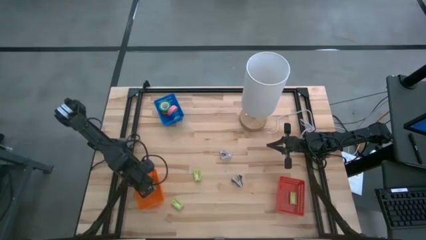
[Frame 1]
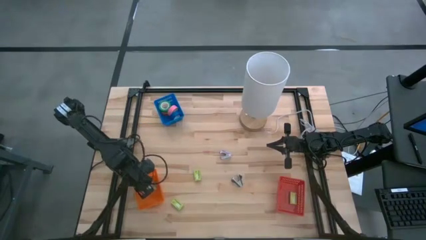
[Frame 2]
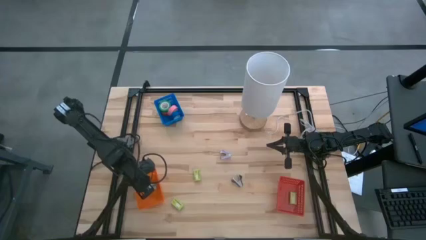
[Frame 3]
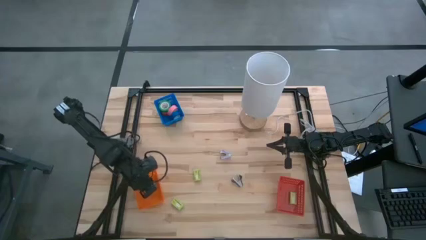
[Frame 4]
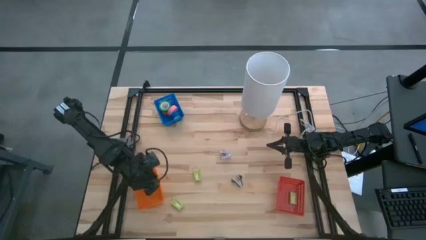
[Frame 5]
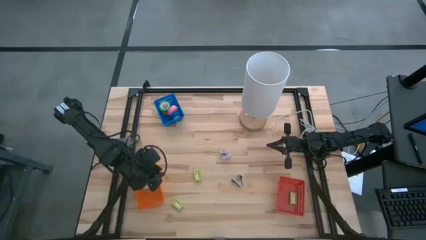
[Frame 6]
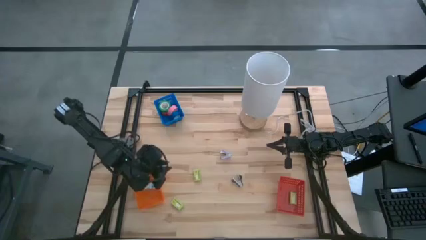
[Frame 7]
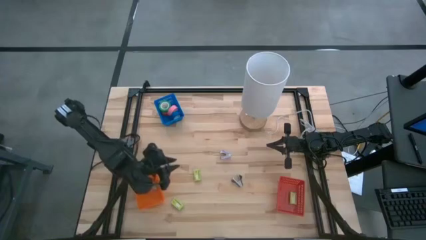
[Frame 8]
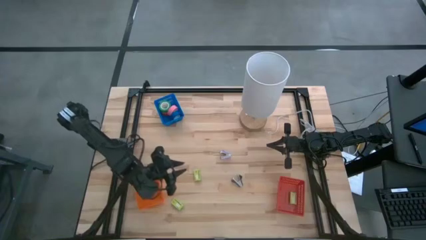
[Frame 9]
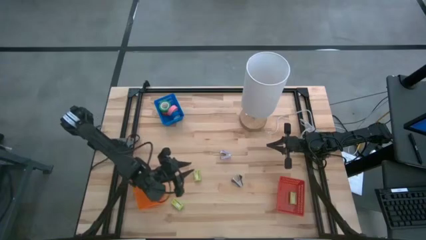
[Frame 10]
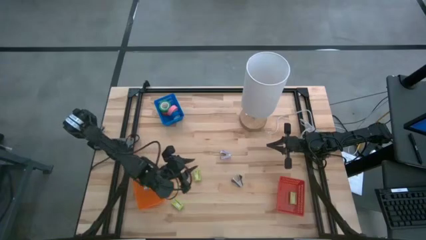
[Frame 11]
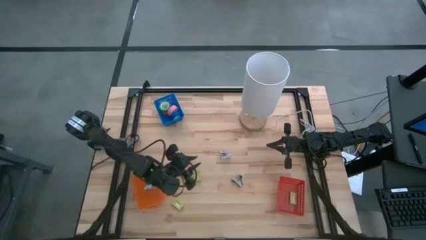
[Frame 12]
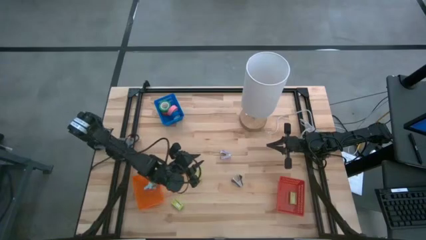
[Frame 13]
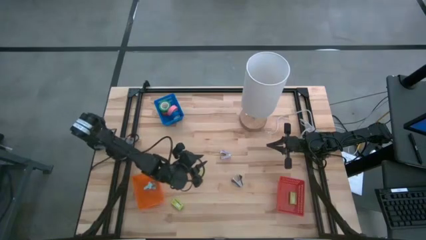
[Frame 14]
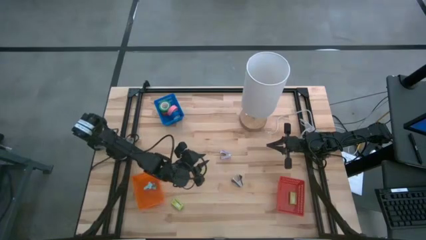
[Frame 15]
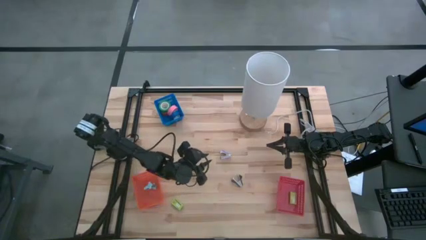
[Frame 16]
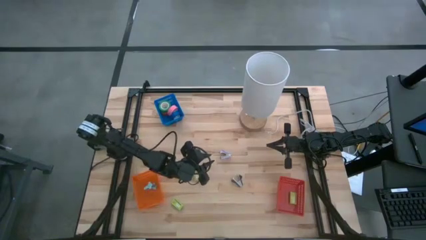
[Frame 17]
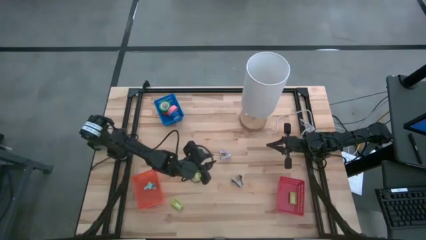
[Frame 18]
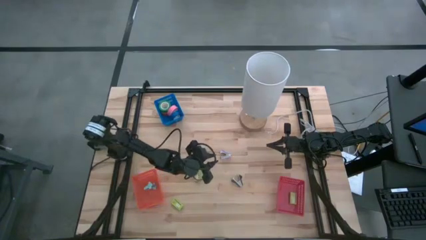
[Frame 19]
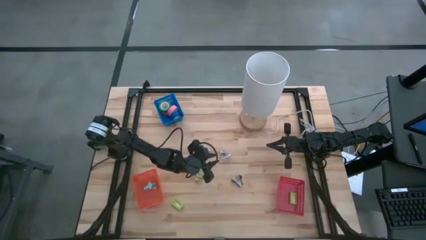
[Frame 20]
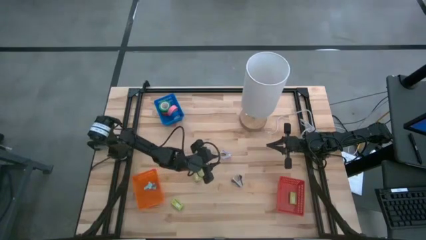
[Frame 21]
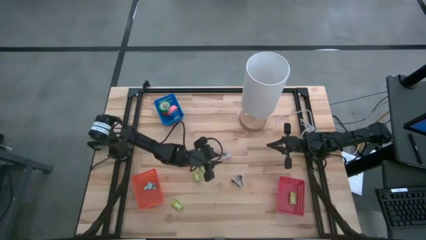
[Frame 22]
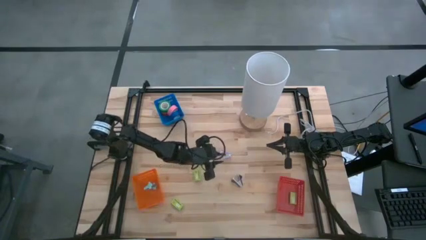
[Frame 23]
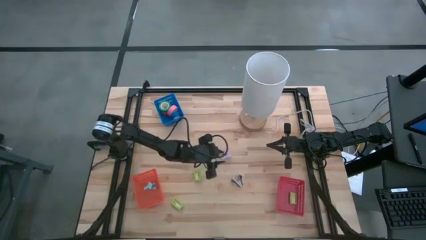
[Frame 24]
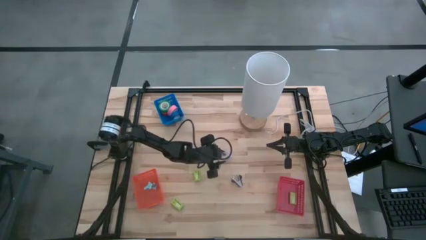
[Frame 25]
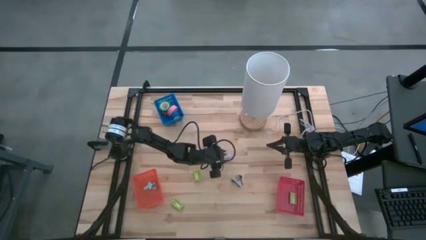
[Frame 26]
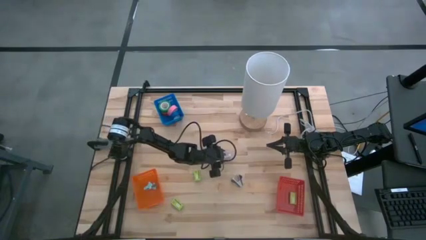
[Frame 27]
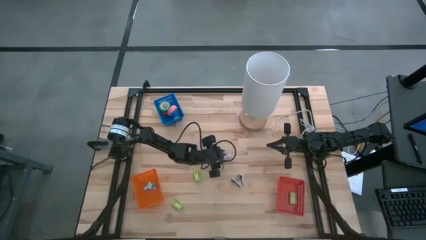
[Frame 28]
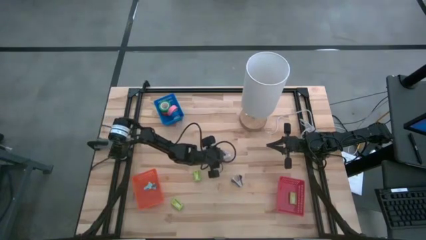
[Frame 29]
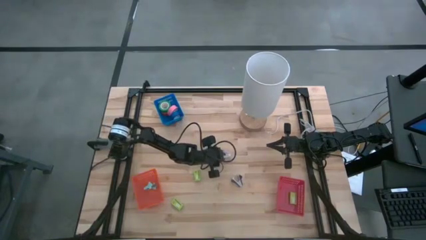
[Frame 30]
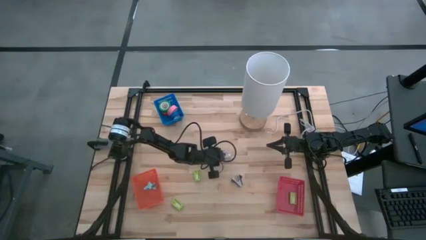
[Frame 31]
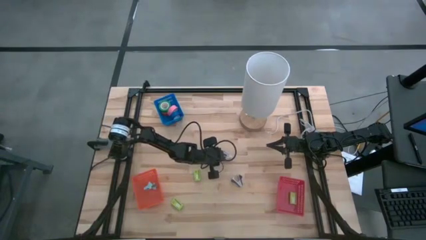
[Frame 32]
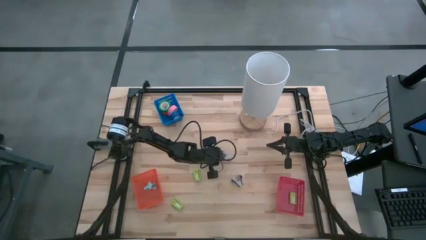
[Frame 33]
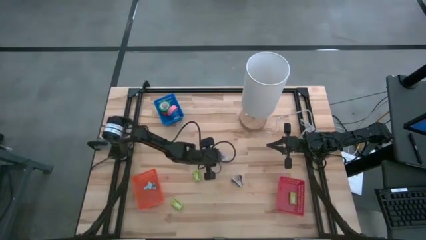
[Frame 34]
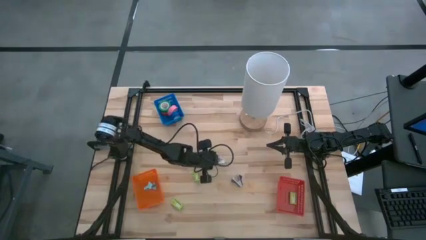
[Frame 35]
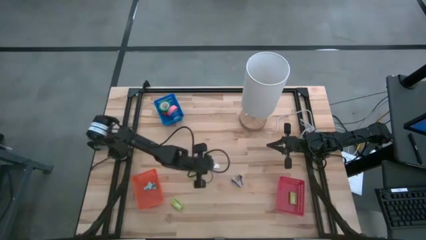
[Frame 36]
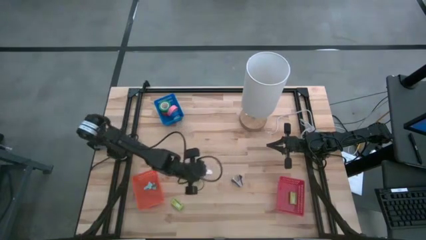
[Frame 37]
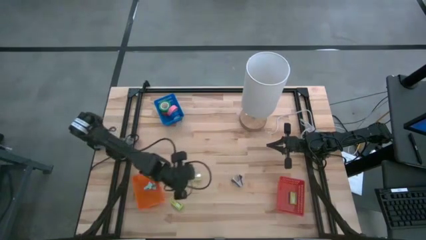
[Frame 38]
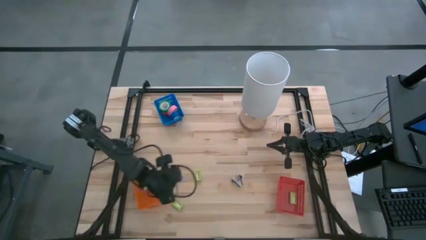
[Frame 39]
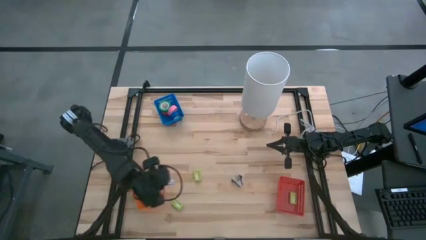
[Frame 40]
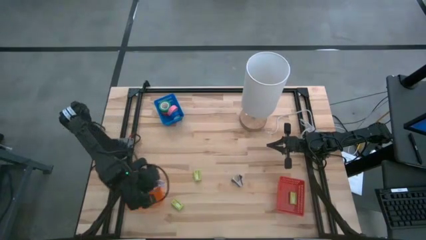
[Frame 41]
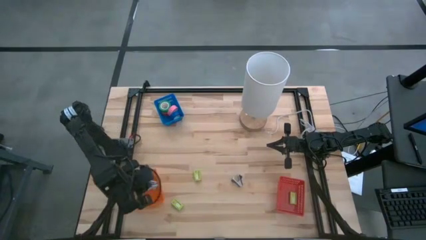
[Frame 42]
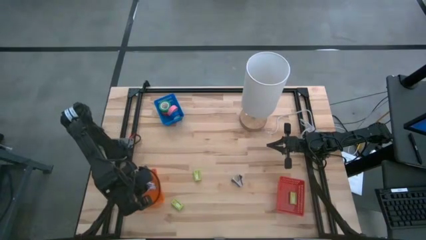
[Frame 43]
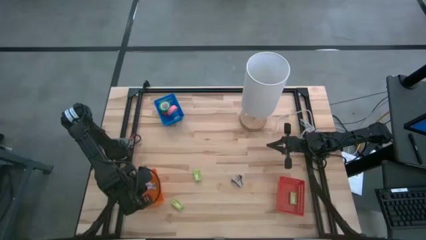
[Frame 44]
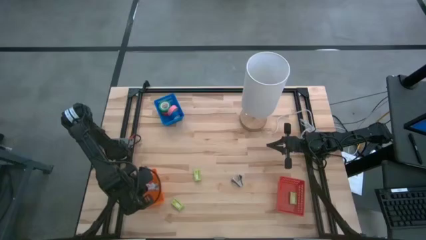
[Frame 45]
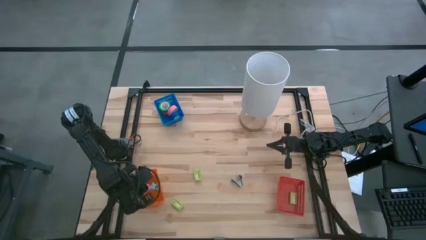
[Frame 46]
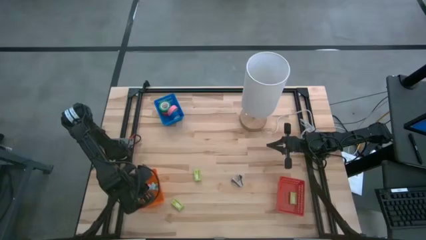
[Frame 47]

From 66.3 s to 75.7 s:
Task: Pick and place Stapler, Stapler remover, tape
Put the purple staple remover into the orange basket

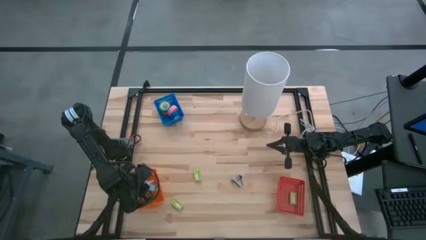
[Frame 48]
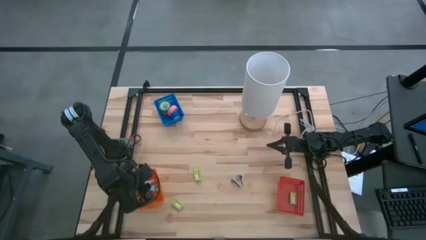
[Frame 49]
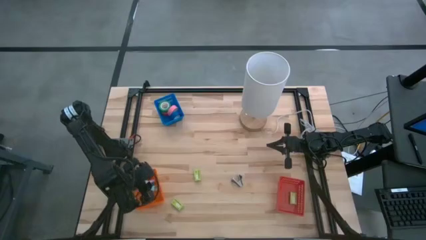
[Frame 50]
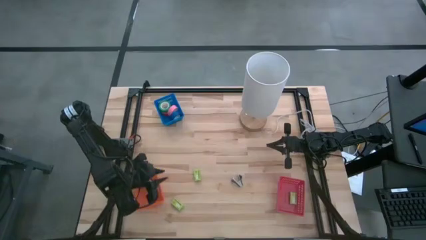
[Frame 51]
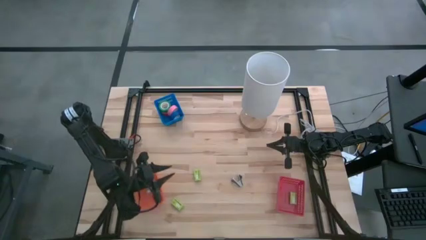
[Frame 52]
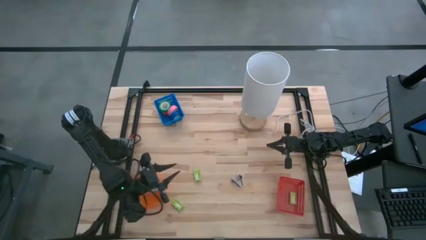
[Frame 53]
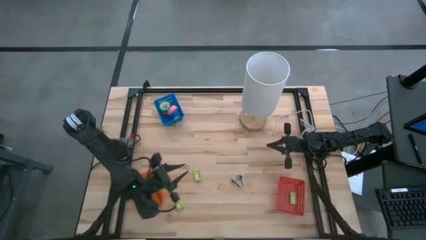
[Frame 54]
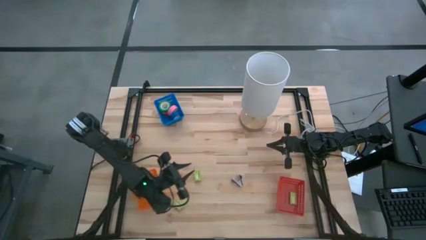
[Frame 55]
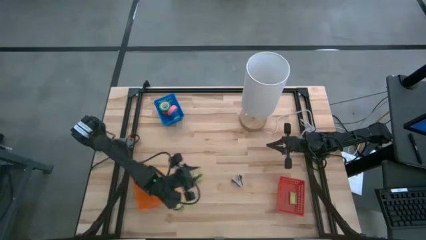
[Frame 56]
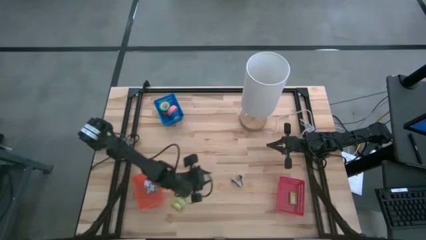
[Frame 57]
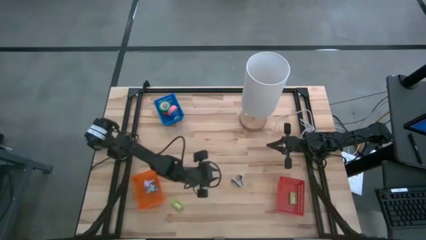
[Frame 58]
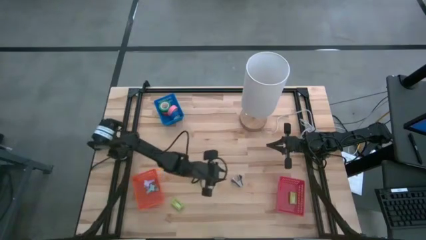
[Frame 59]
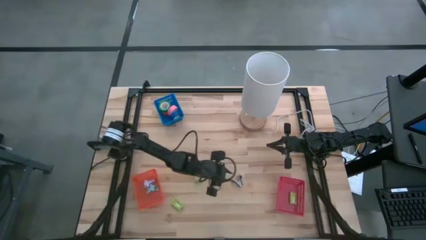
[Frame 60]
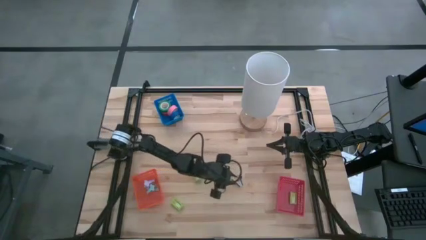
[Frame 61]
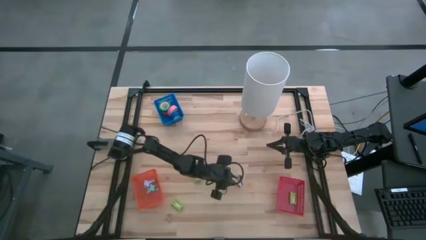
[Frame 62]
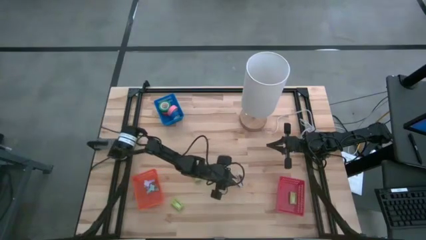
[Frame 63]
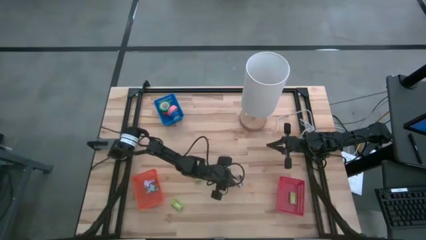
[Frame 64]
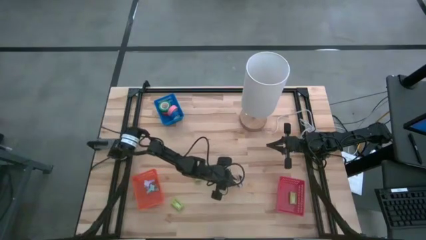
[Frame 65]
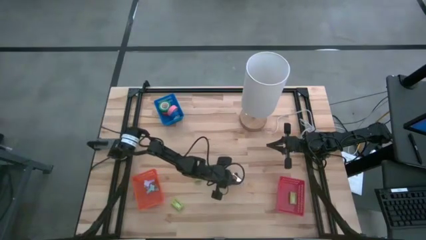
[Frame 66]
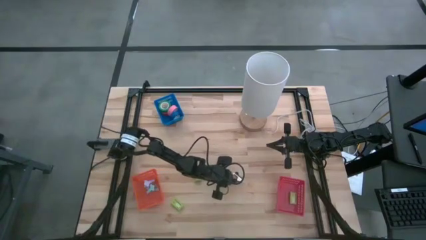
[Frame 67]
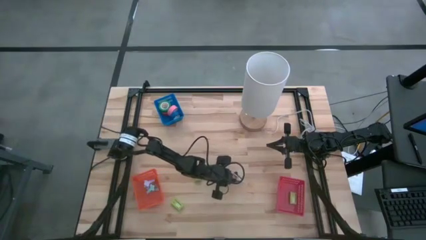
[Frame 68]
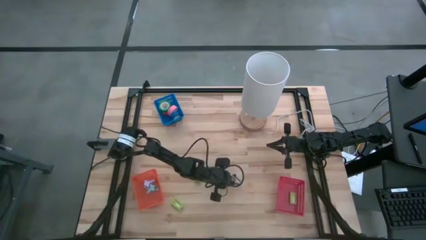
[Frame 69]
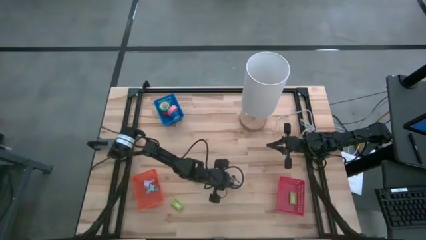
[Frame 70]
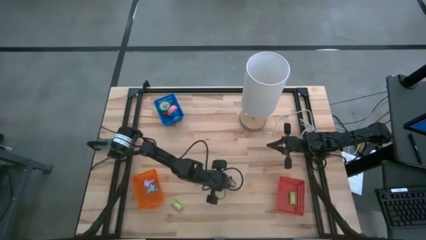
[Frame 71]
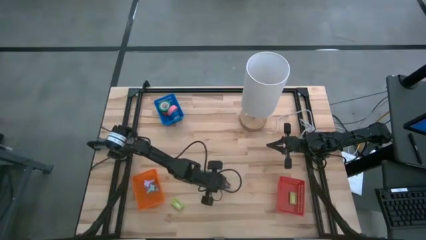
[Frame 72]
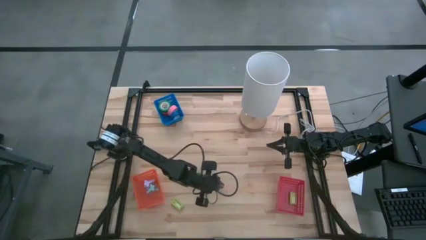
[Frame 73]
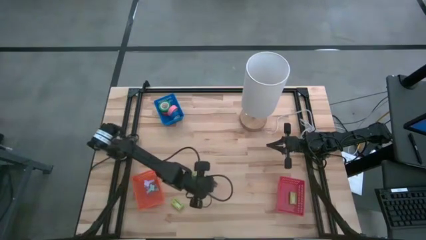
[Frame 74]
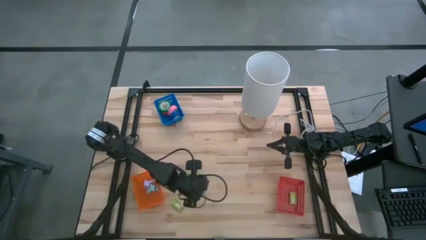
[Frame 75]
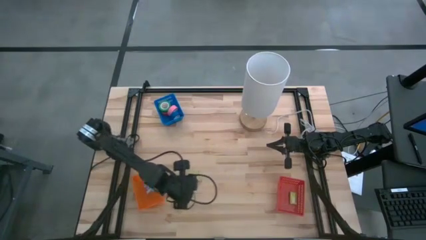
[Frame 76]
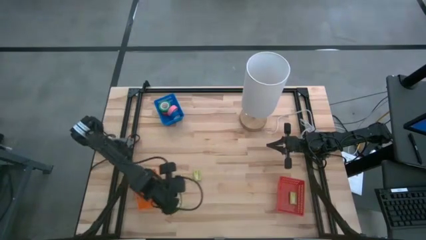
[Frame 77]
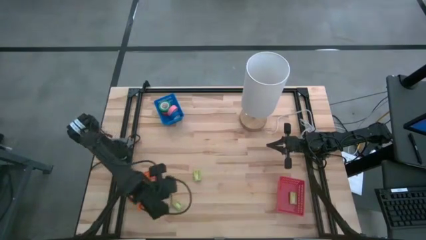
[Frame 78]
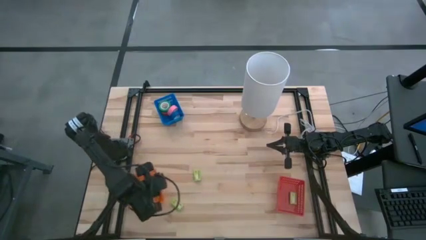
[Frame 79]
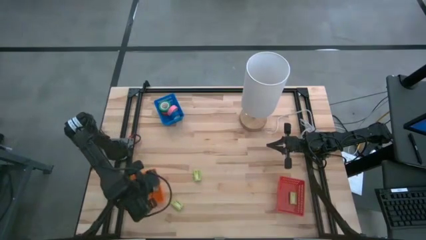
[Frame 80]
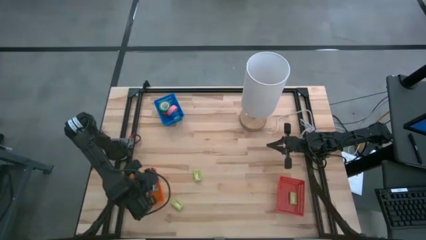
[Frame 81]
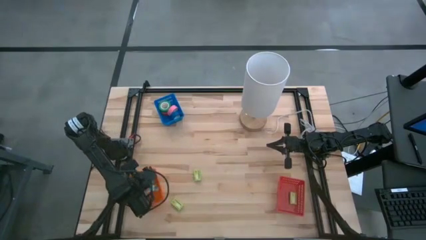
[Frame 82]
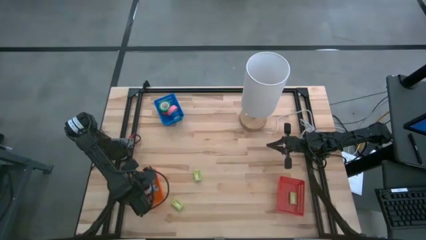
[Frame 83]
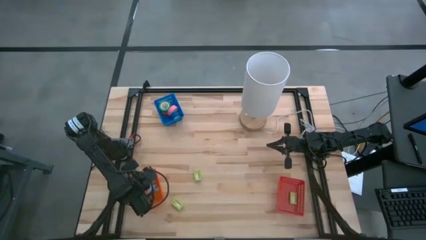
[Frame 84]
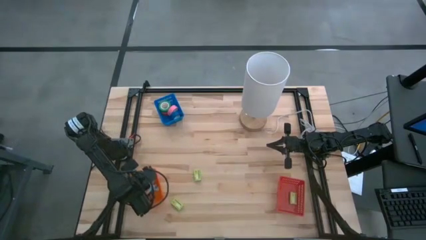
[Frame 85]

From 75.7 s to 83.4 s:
Put the black staple remover into the orange basket
